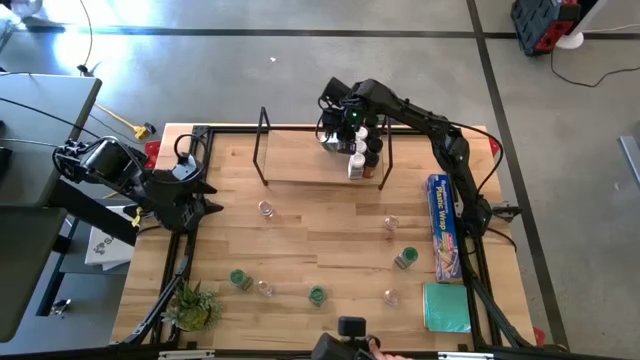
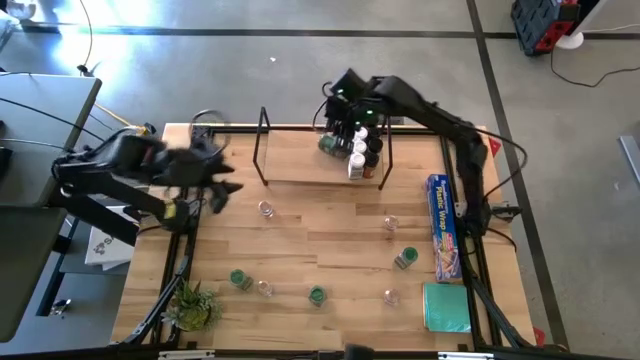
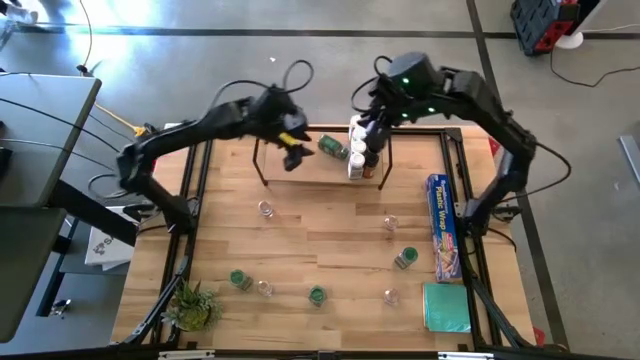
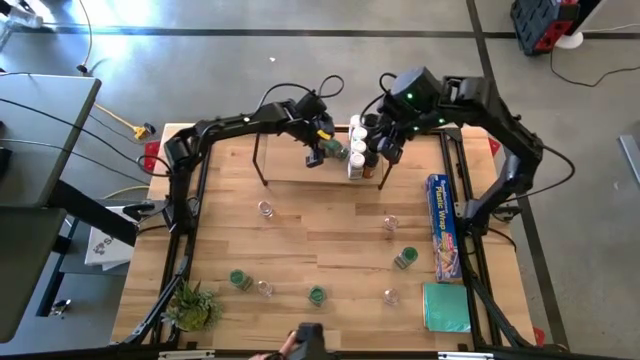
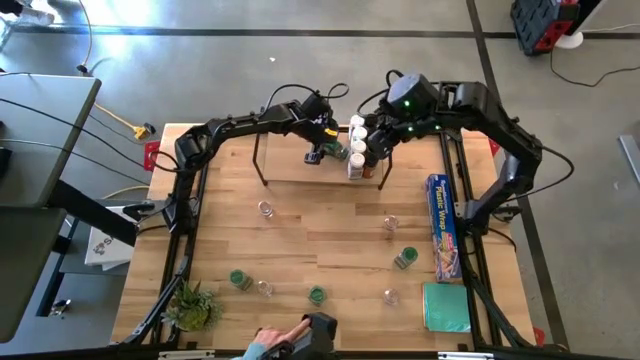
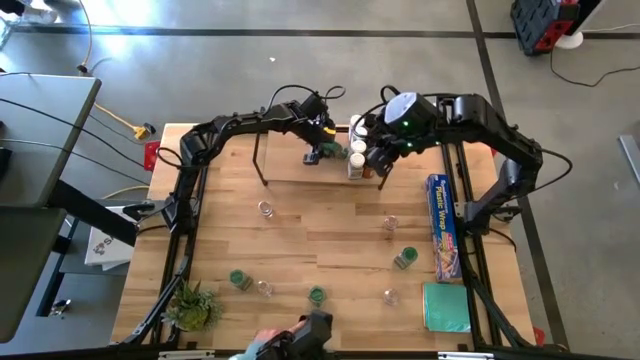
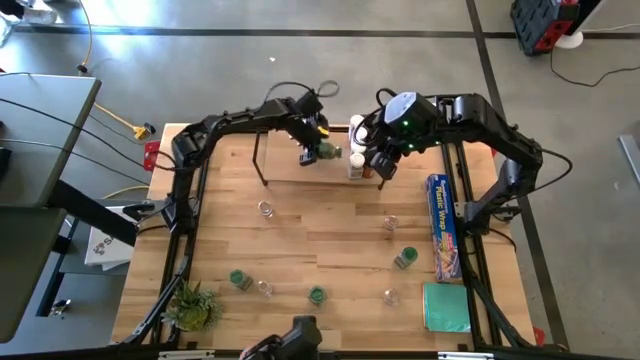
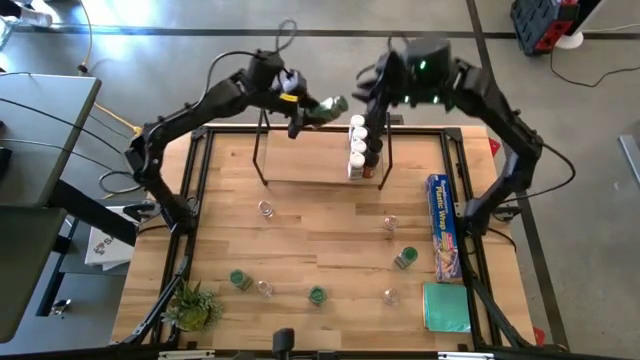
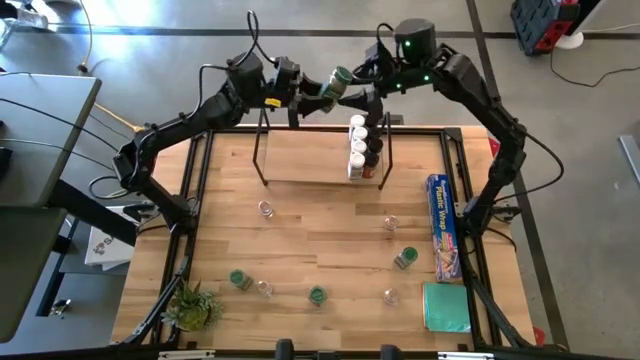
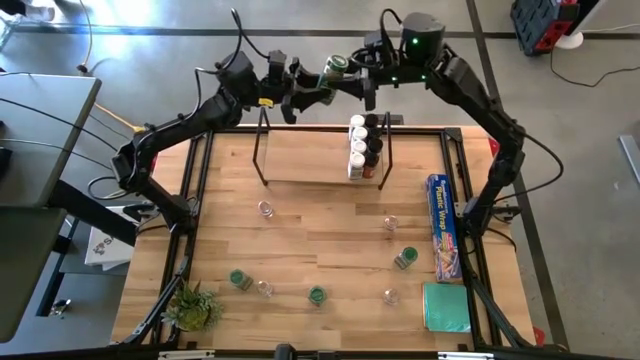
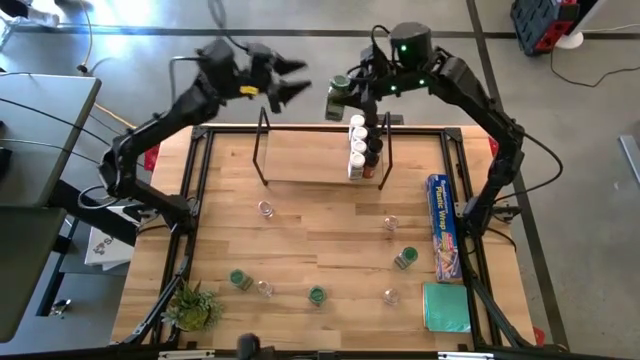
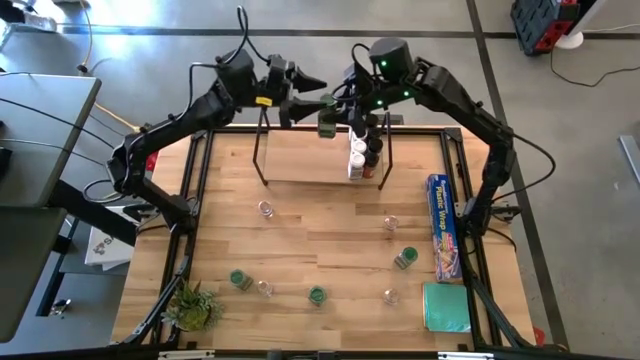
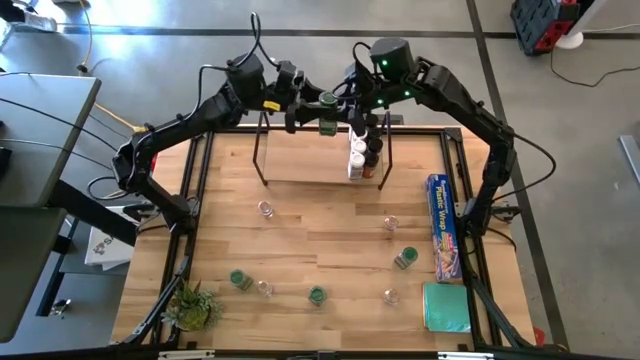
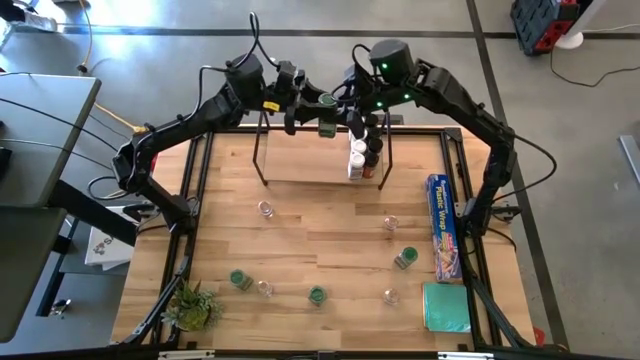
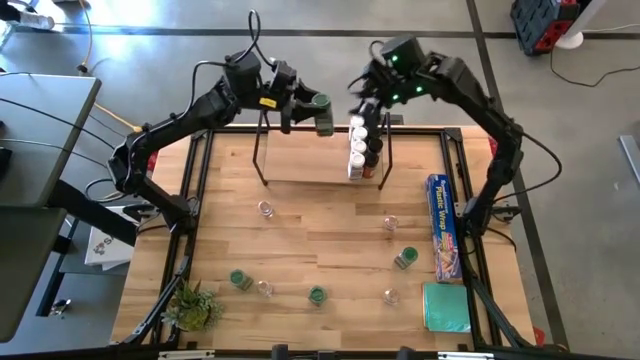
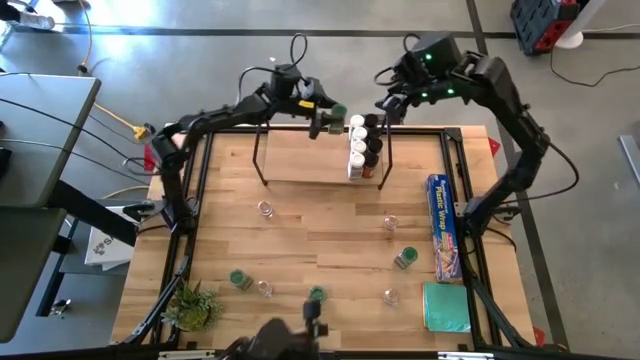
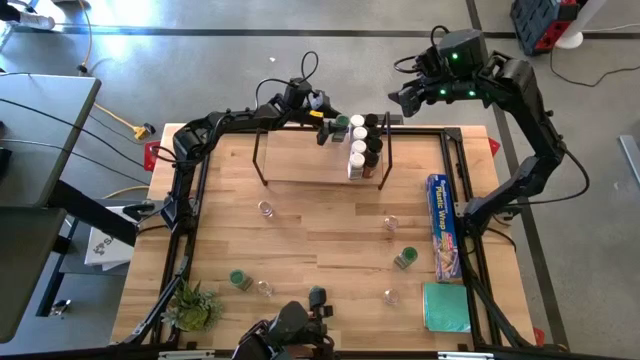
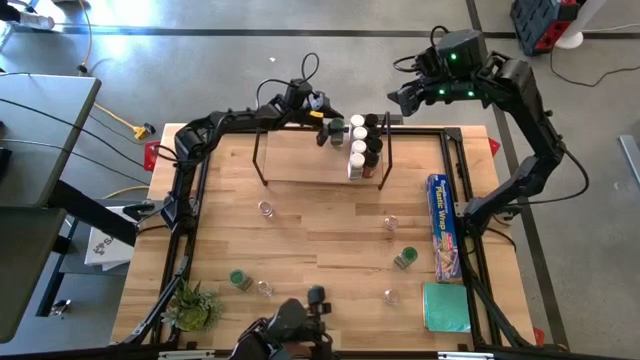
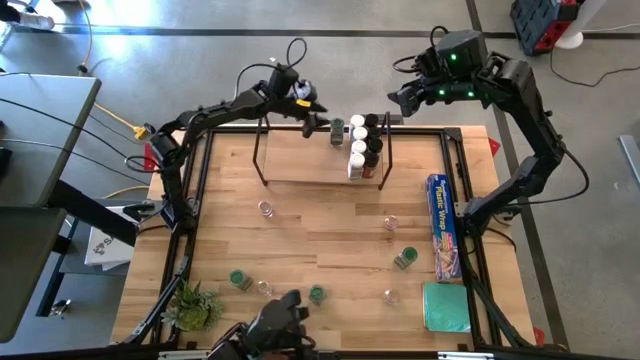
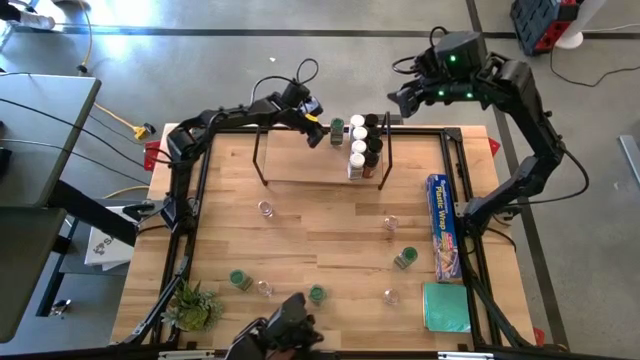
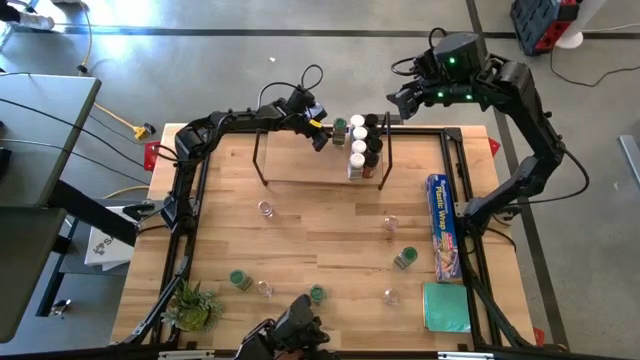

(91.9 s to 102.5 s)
Task: Shelf spices
Put the green seasoning bottle on the shelf

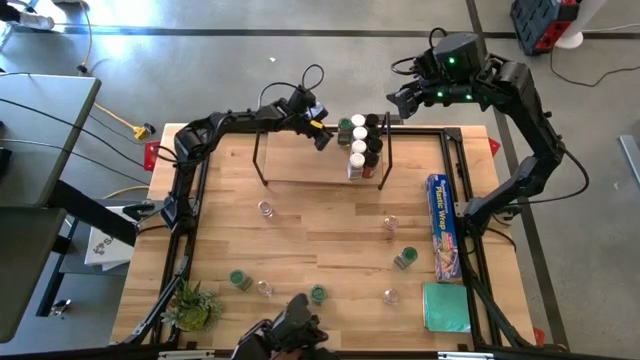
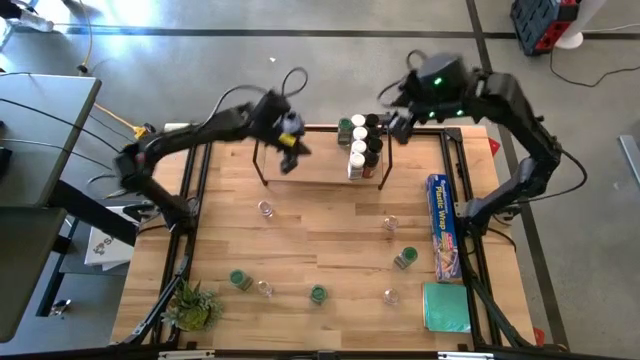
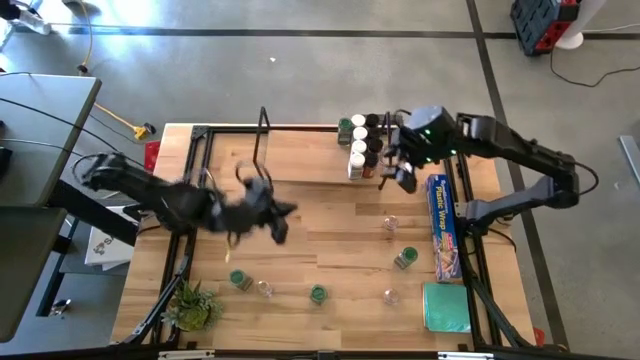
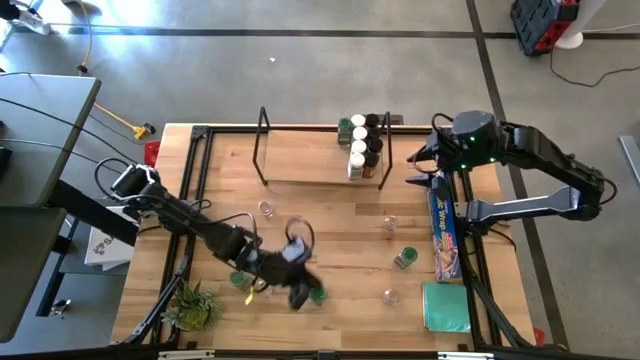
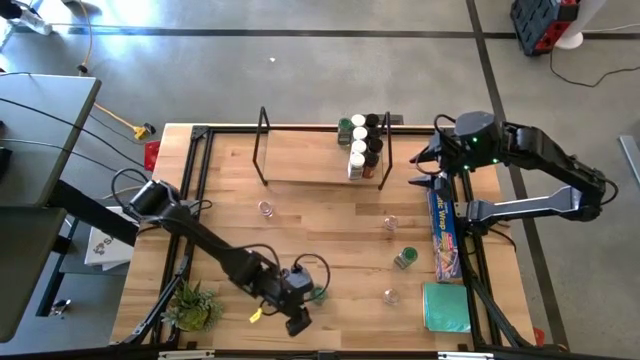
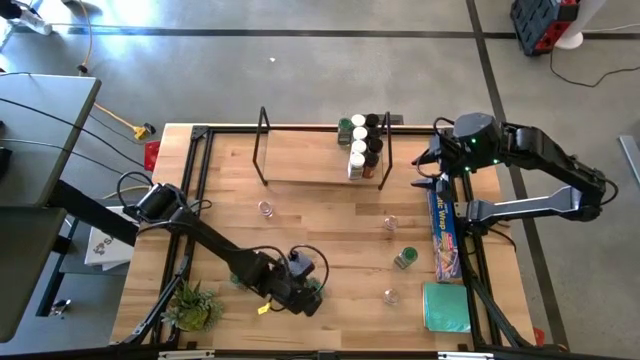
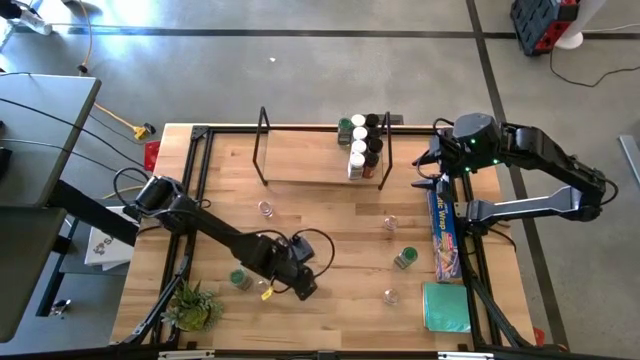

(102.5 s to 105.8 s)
Put the green seasoning bottle on the shelf aligned with the other green seasoning bottle

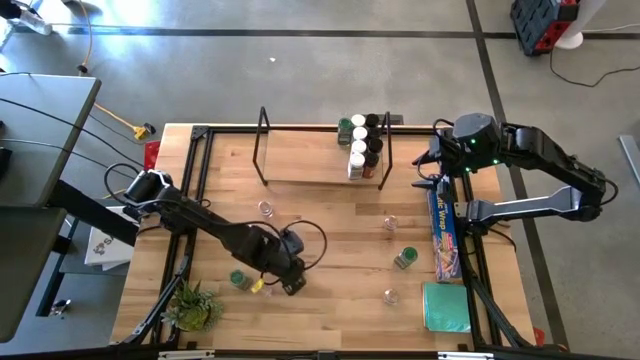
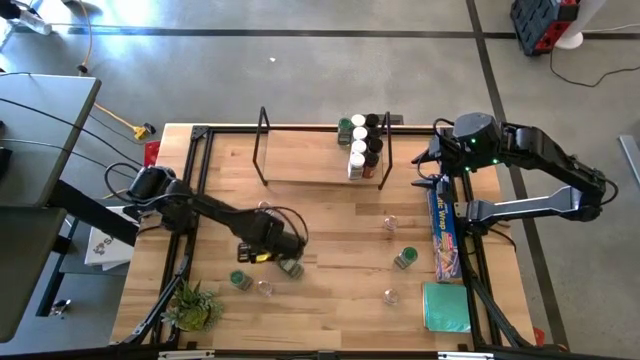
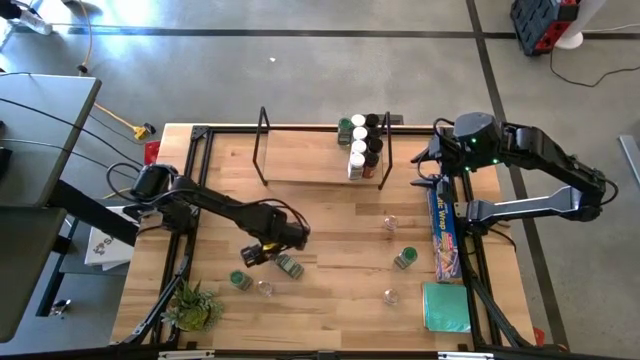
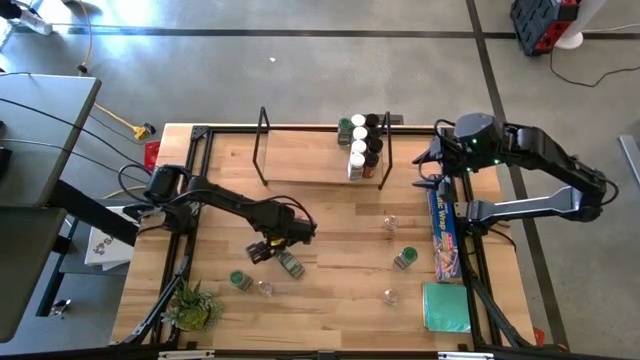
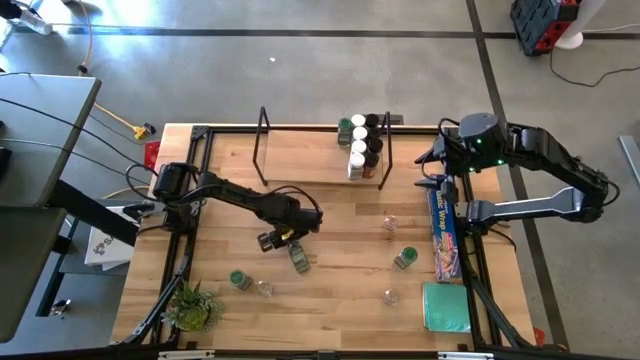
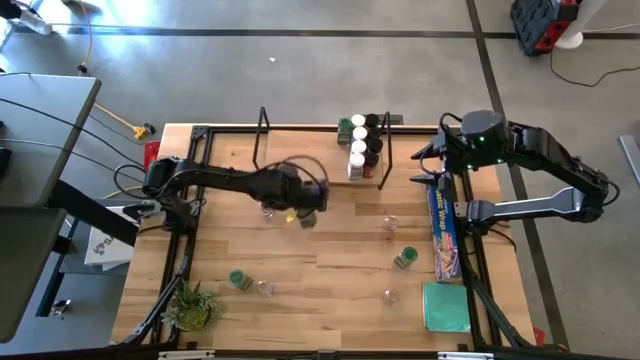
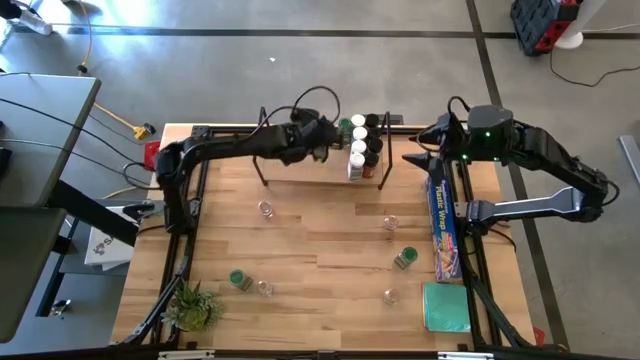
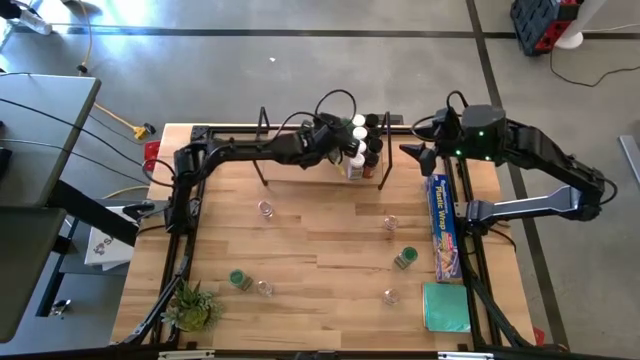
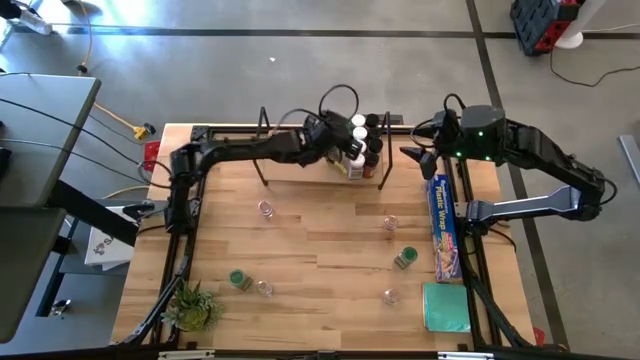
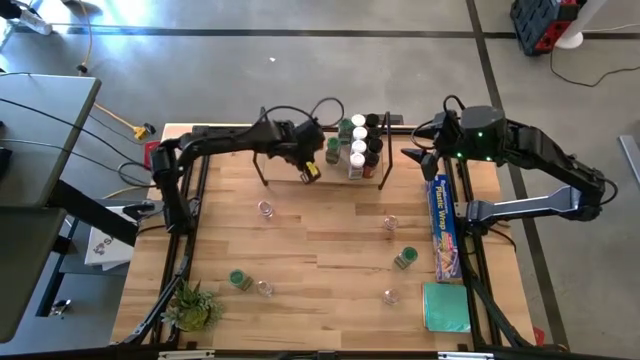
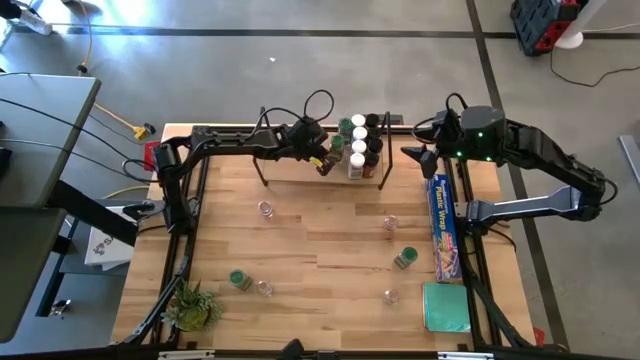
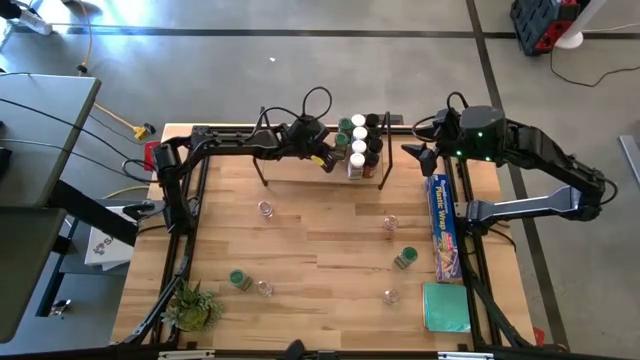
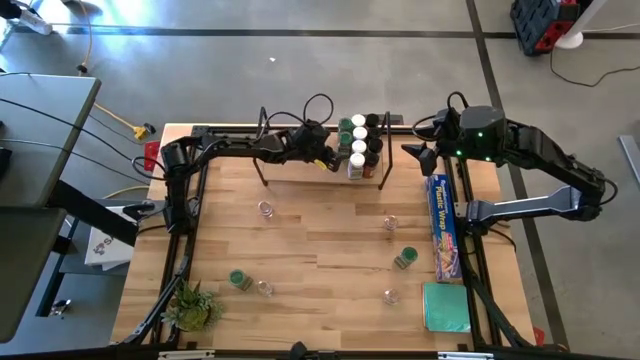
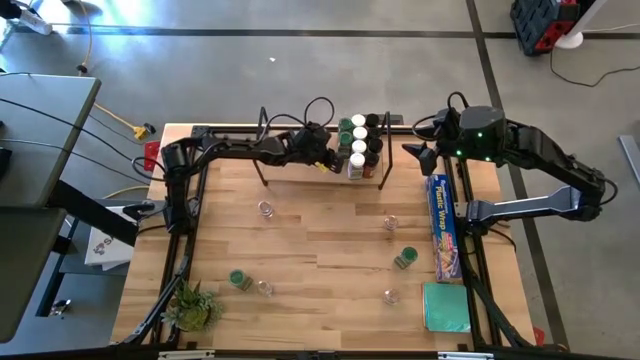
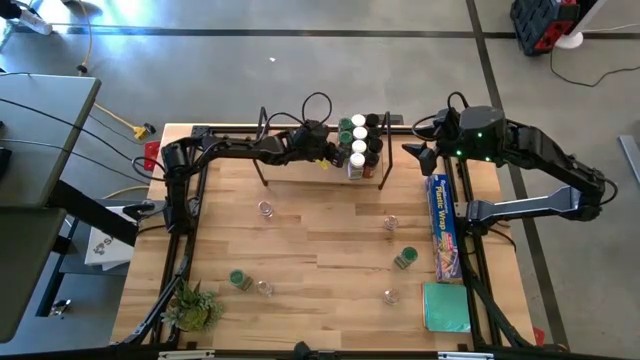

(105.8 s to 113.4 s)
Put the green seasoning bottle on the shelf aligned with the other green seasoning bottle

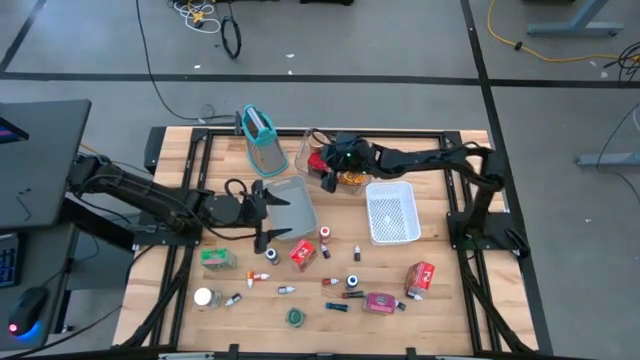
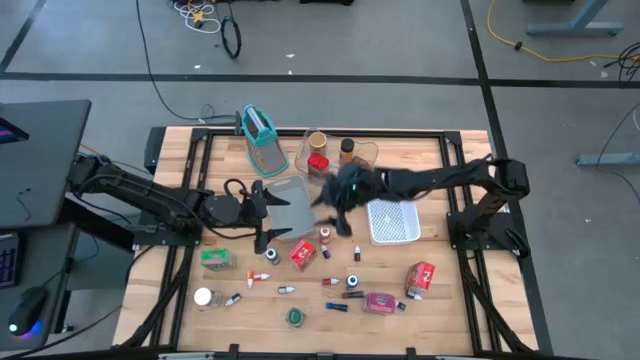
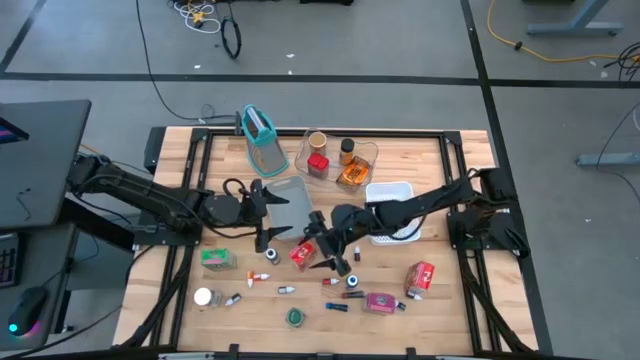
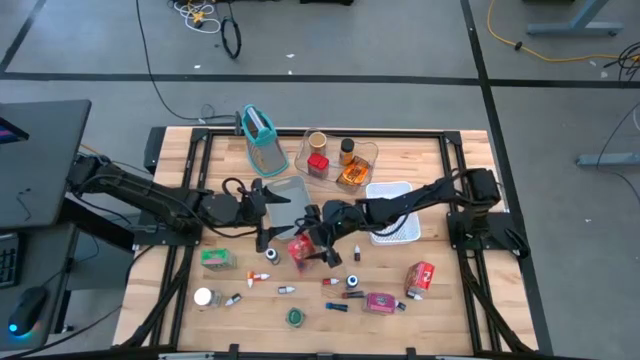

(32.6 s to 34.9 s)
Task: Pick & Place Kitchen Items
Put the red cereal box into the white bin
